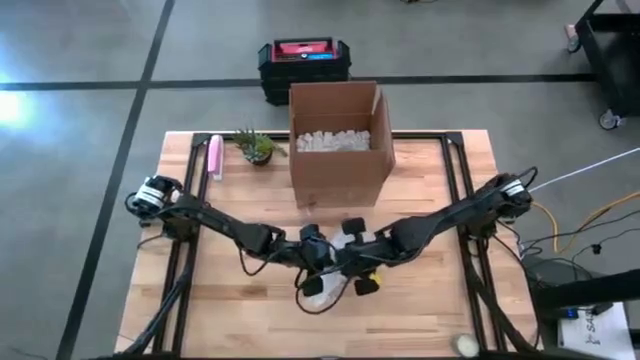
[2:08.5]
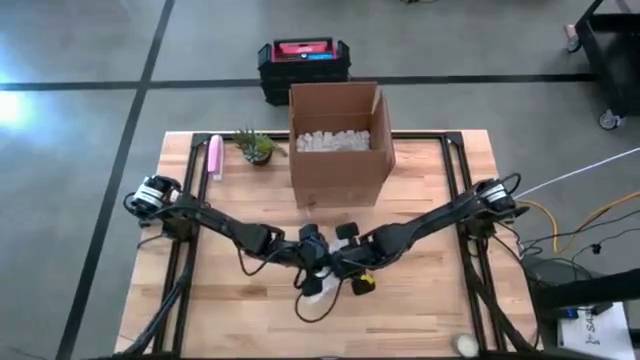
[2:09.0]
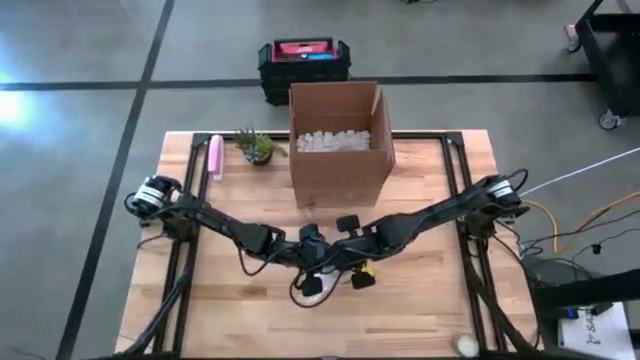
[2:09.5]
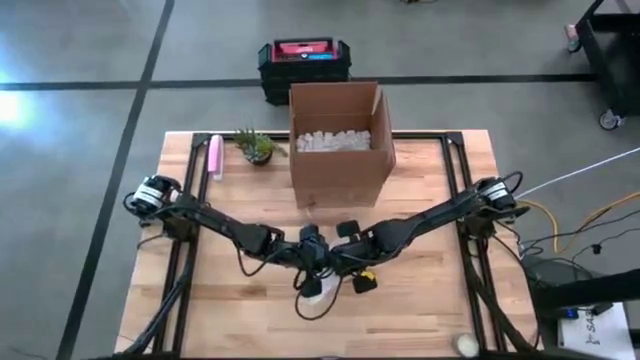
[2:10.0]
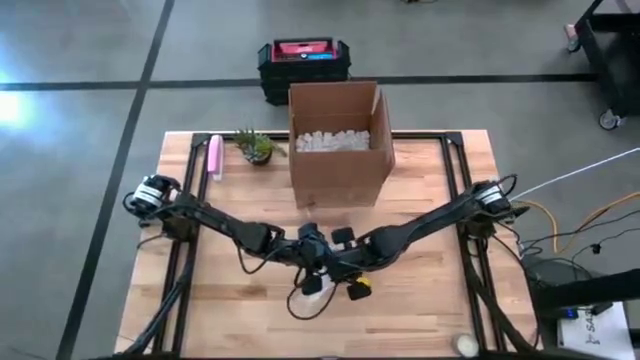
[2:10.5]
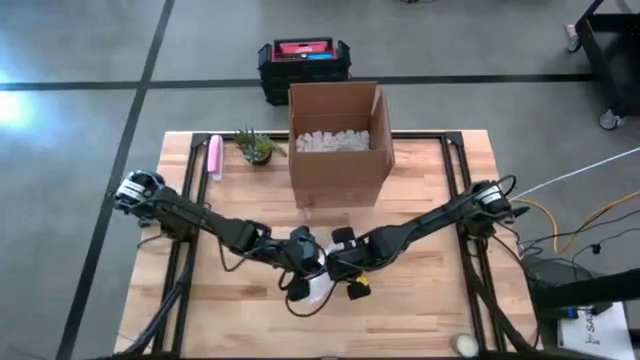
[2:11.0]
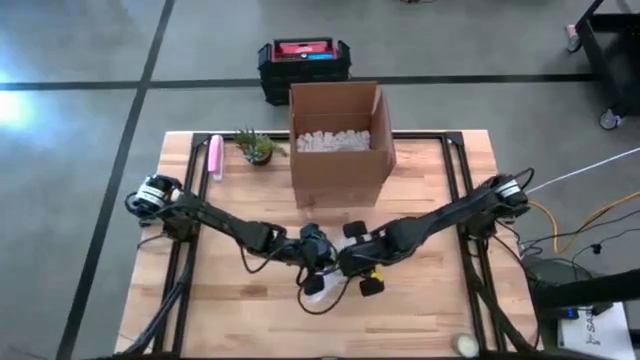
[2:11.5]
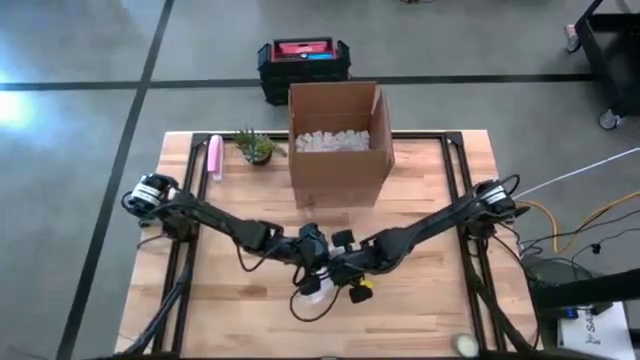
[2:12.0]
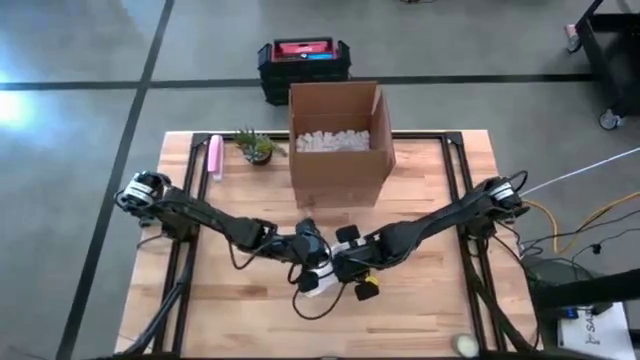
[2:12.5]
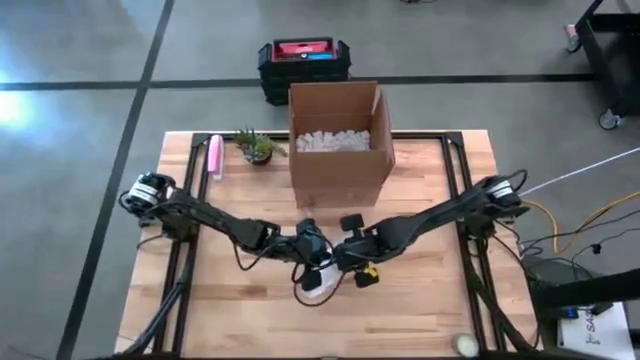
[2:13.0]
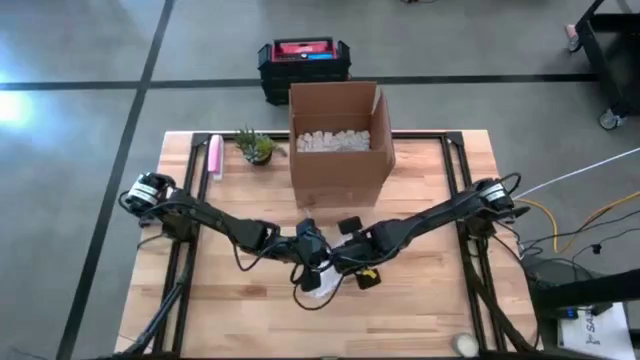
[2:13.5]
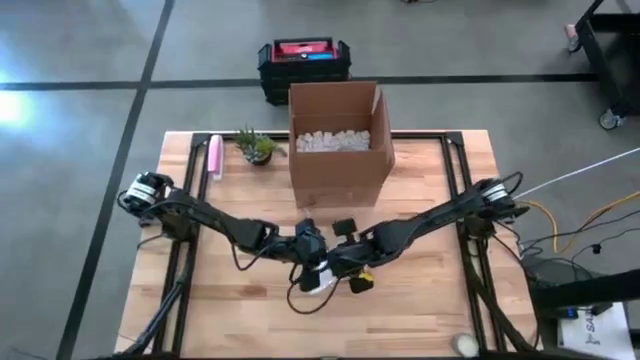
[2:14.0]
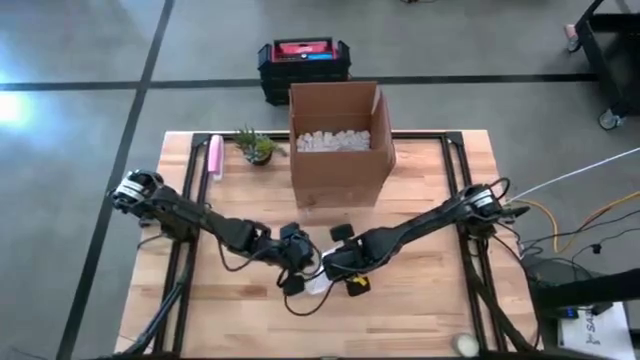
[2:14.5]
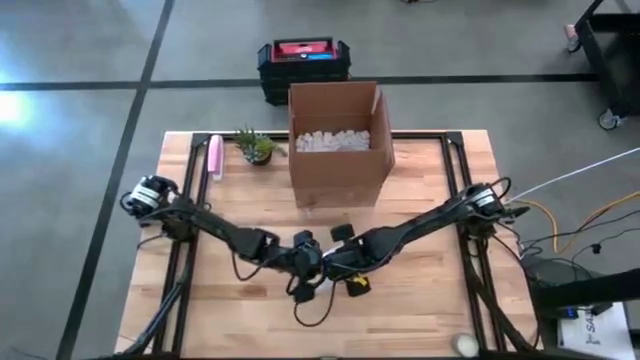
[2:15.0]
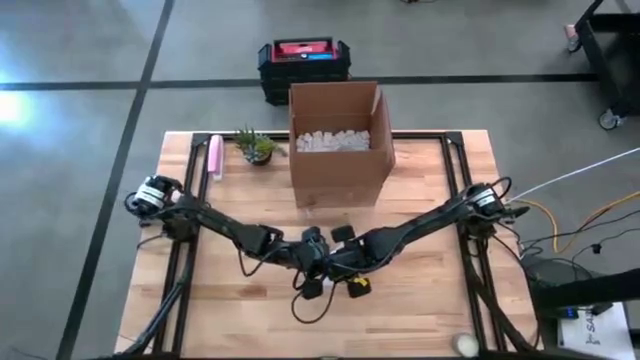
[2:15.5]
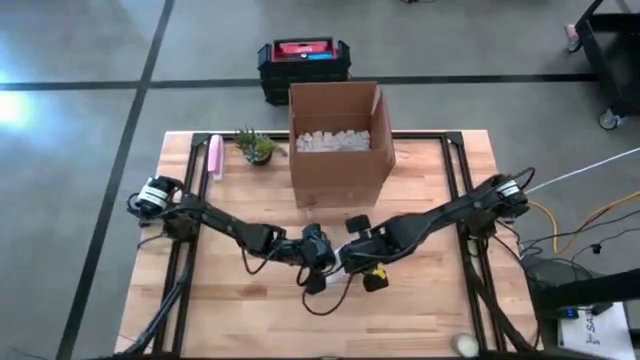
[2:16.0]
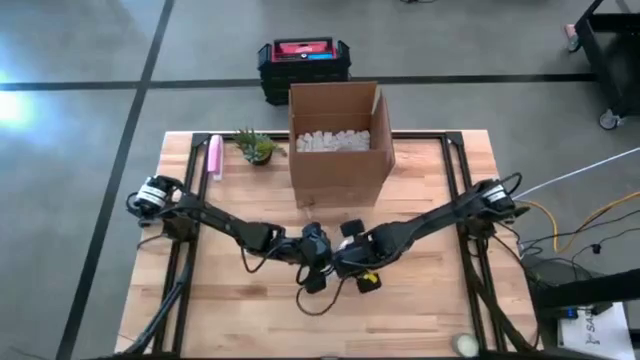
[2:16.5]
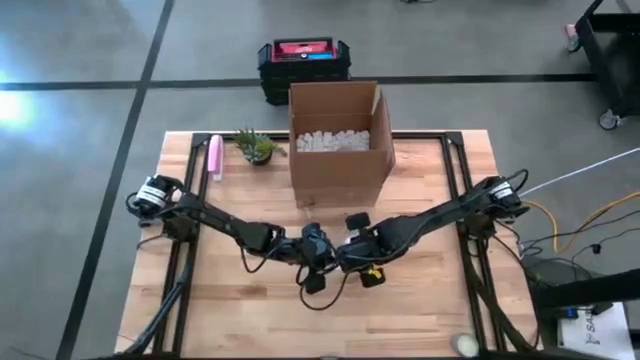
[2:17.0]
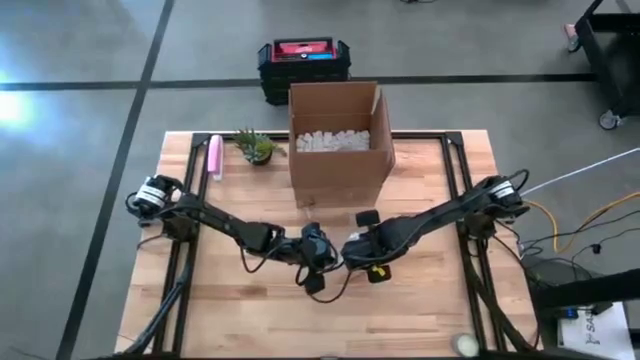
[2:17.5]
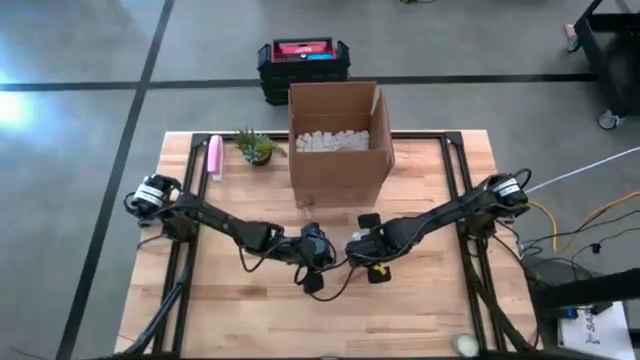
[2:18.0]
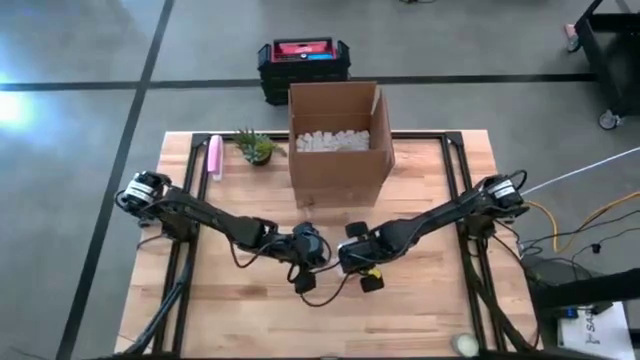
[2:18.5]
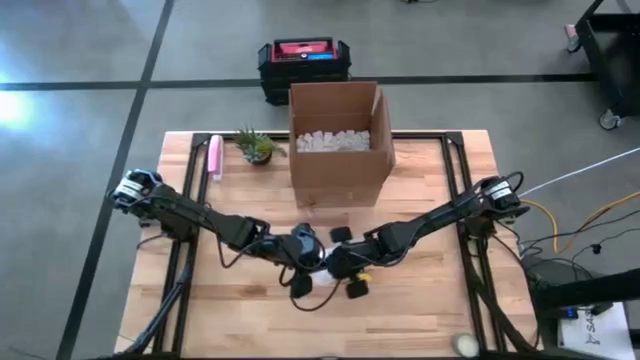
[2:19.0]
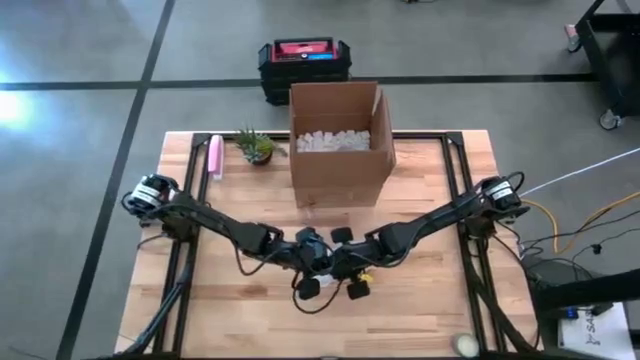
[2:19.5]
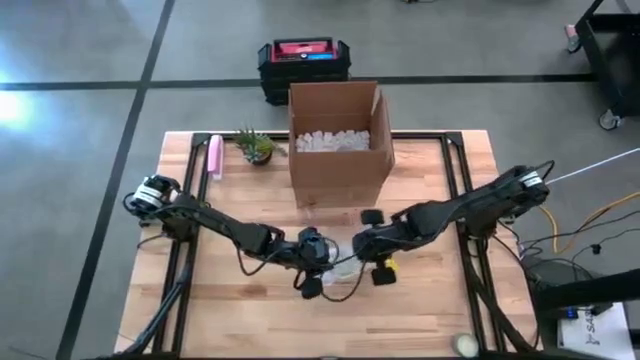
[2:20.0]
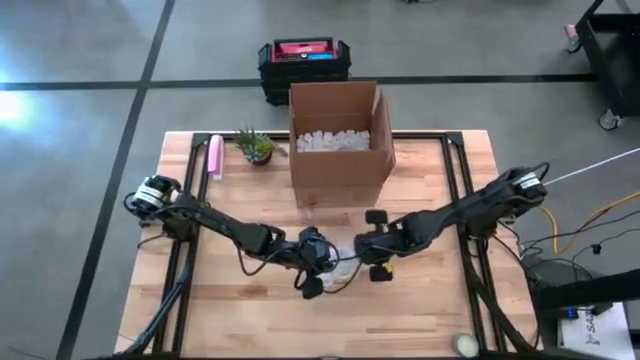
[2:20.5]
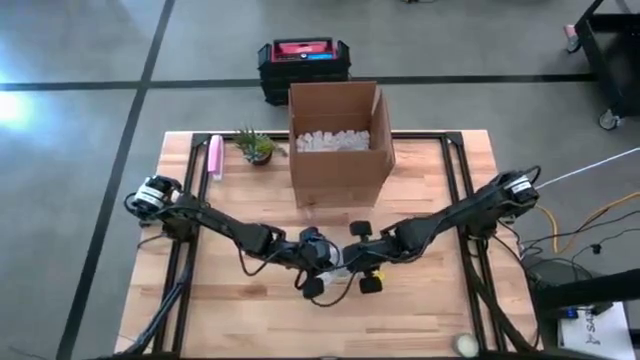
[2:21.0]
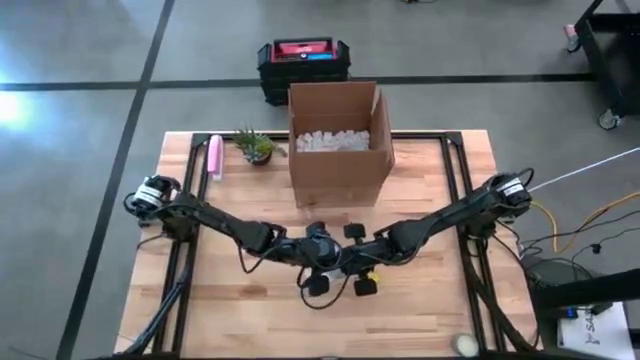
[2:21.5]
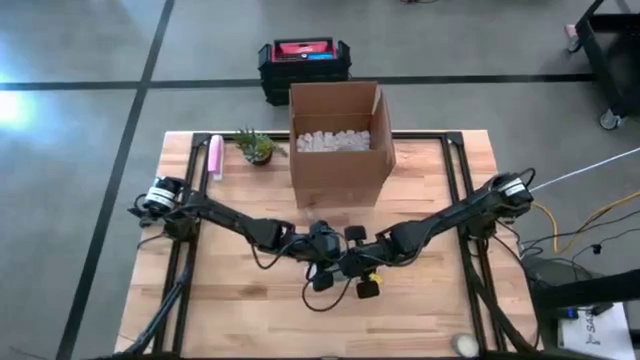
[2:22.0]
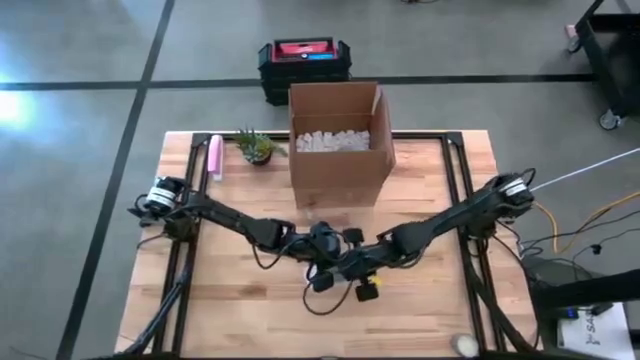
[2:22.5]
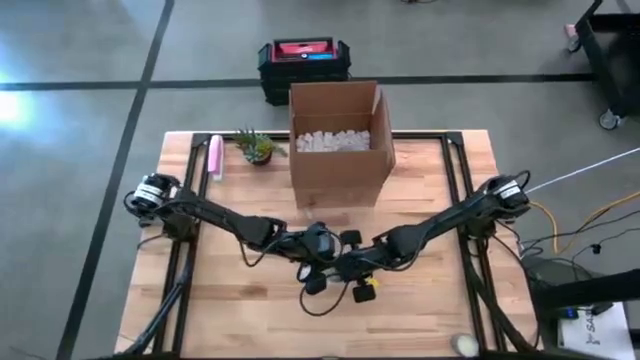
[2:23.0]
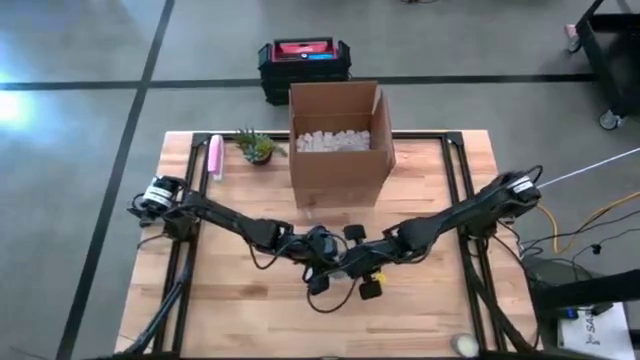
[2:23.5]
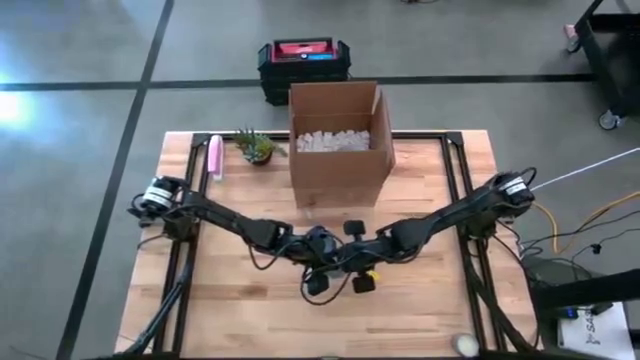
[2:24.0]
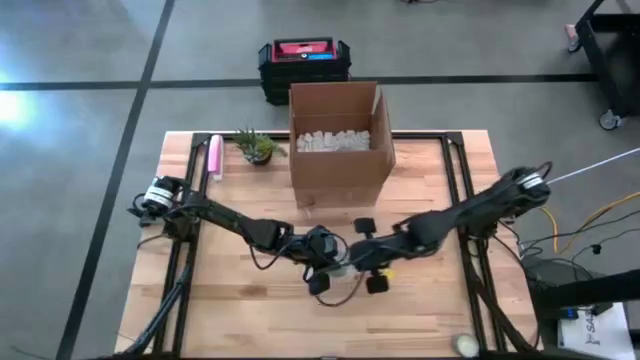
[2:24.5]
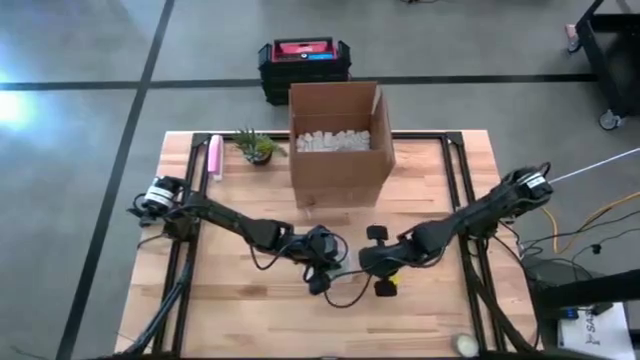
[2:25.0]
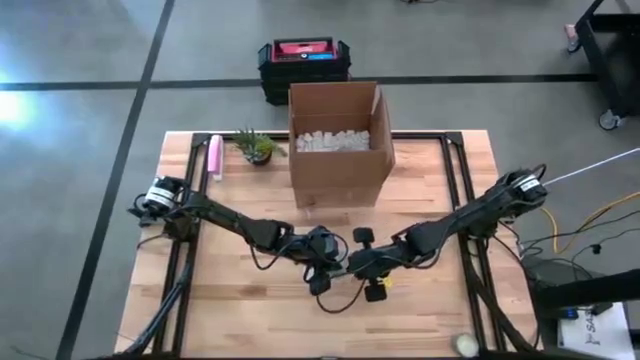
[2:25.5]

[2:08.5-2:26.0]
Task: wrap mug
Wrap the orange patterned mug using the bubble wrap

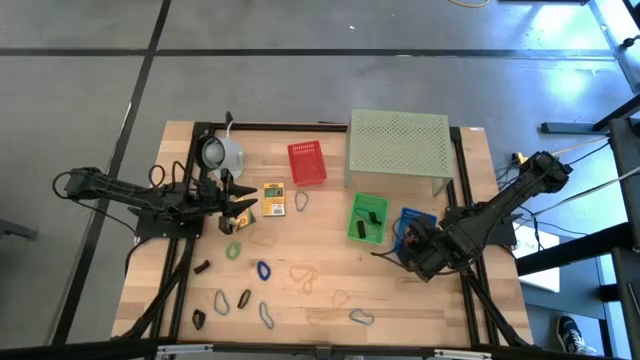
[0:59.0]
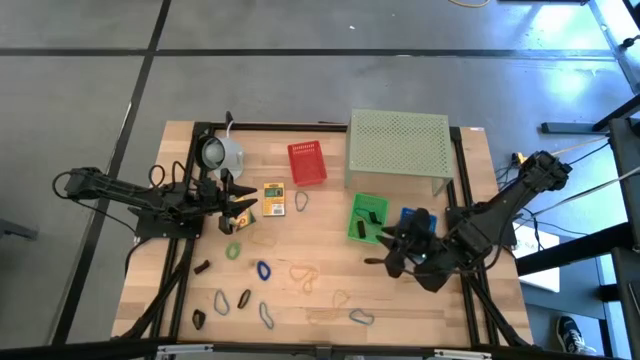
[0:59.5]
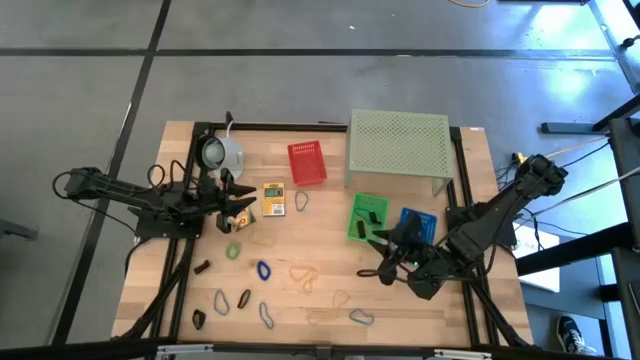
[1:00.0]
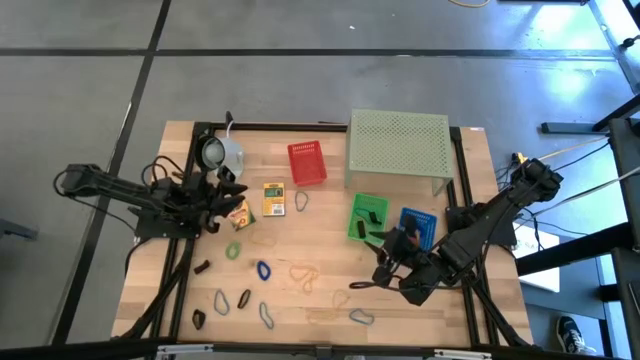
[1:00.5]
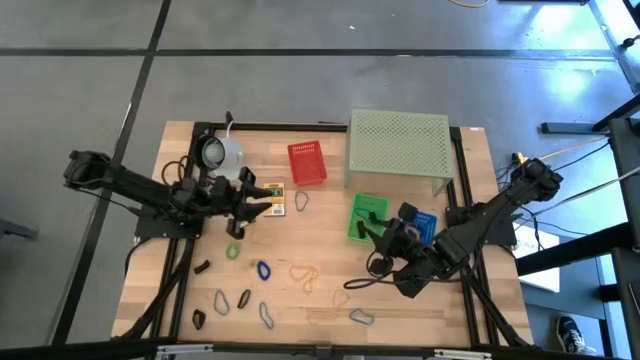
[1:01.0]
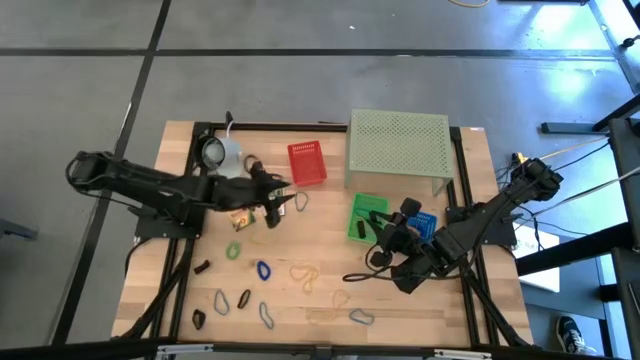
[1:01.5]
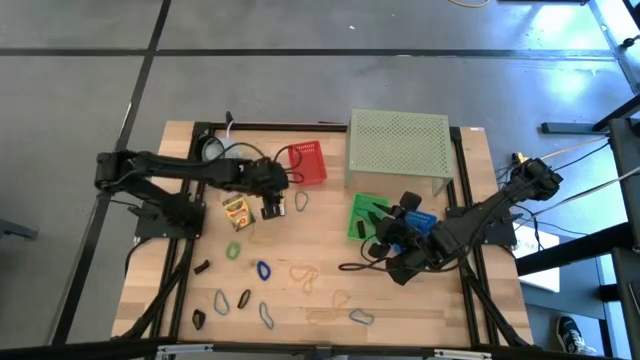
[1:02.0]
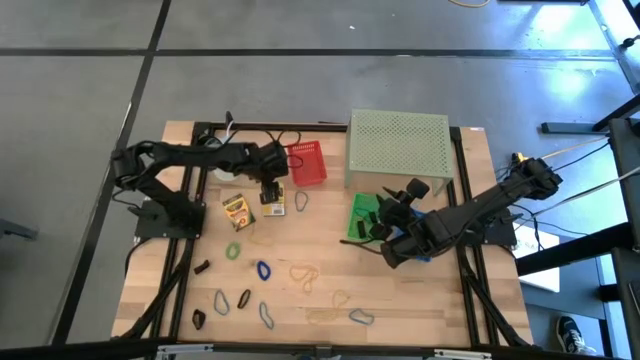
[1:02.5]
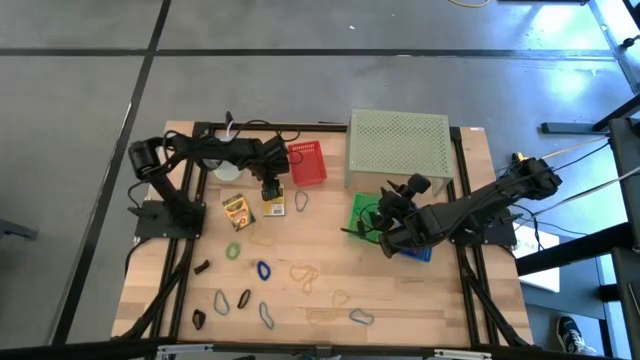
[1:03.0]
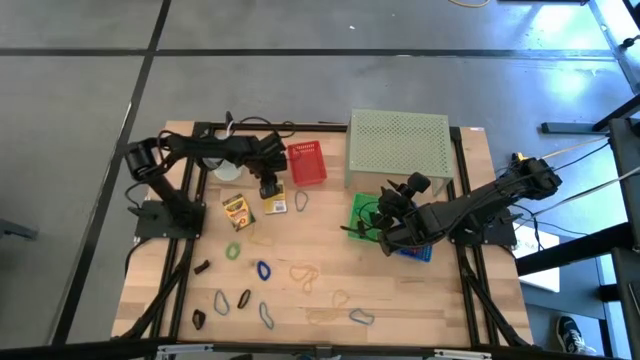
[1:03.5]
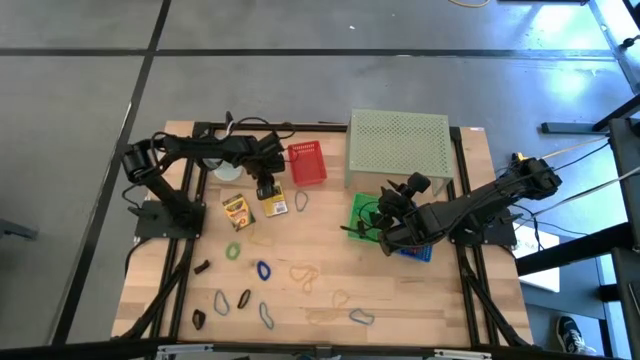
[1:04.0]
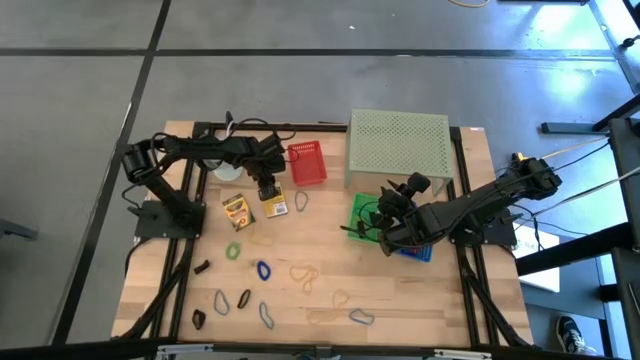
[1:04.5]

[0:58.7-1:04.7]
Task: Pick & Place Office Desk Supplies
Put the yellow crayon box into the red bin
